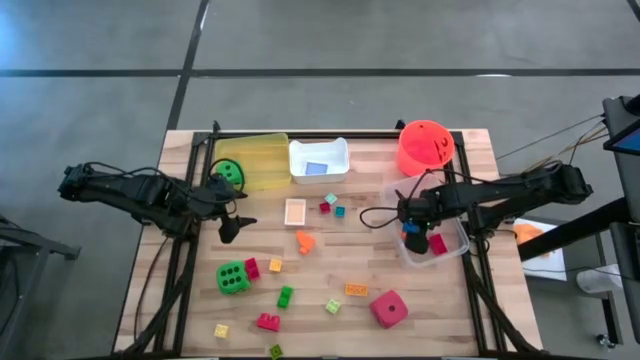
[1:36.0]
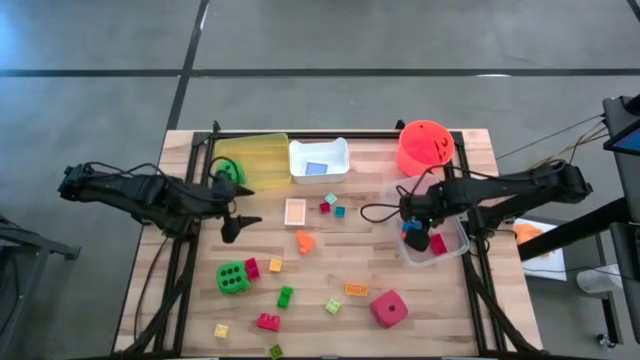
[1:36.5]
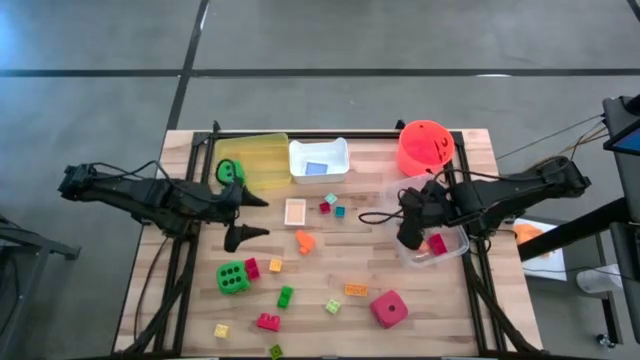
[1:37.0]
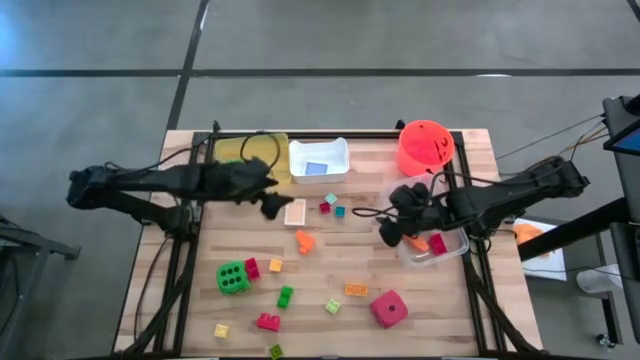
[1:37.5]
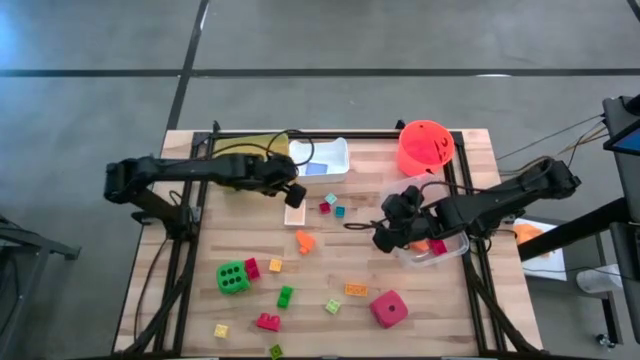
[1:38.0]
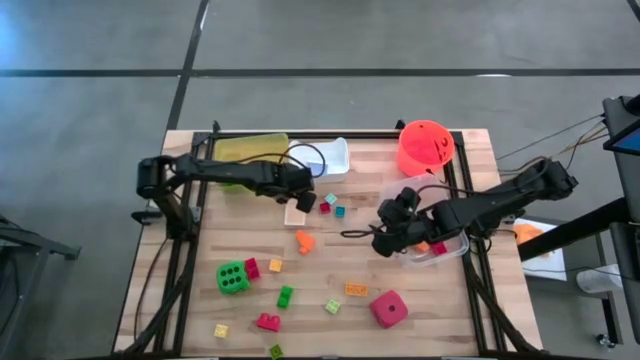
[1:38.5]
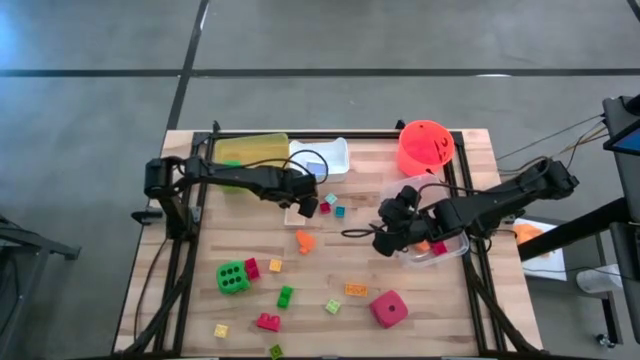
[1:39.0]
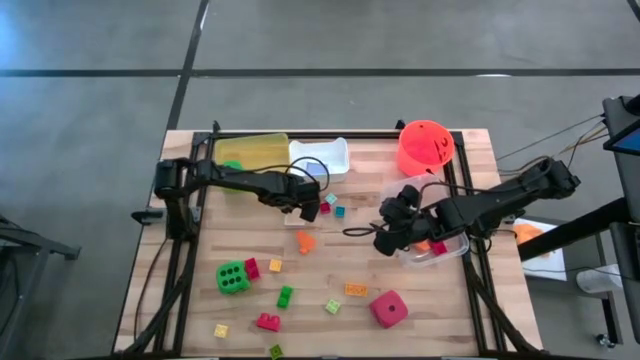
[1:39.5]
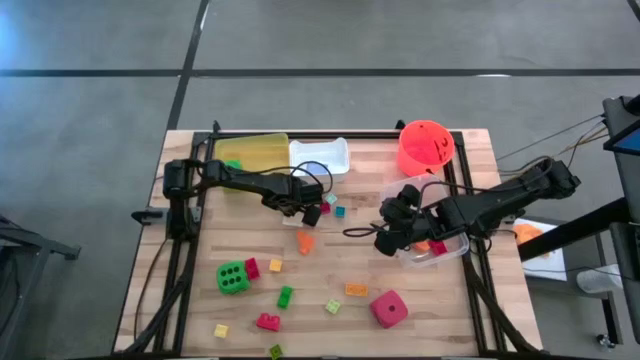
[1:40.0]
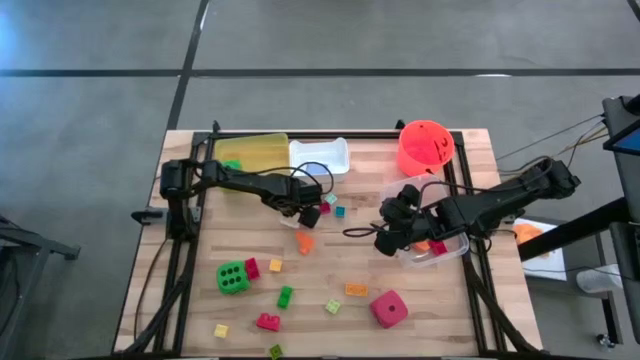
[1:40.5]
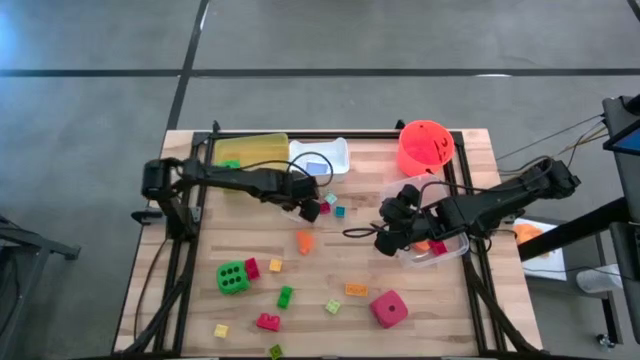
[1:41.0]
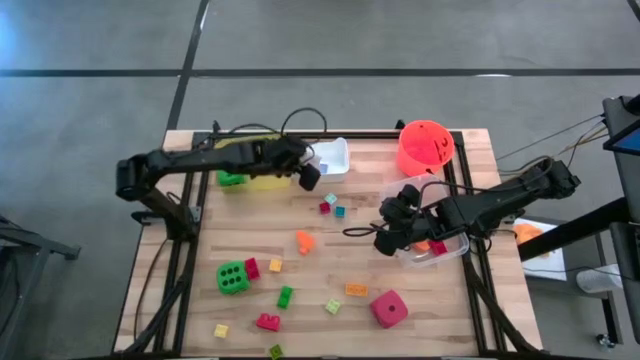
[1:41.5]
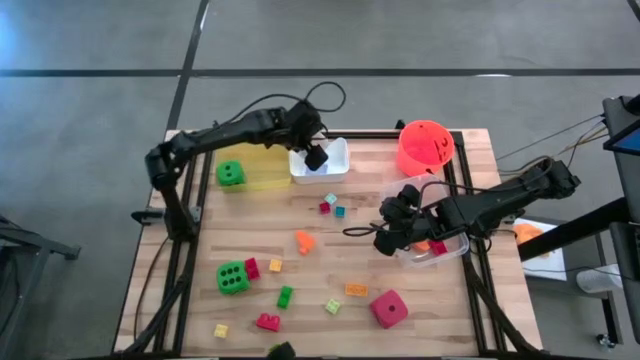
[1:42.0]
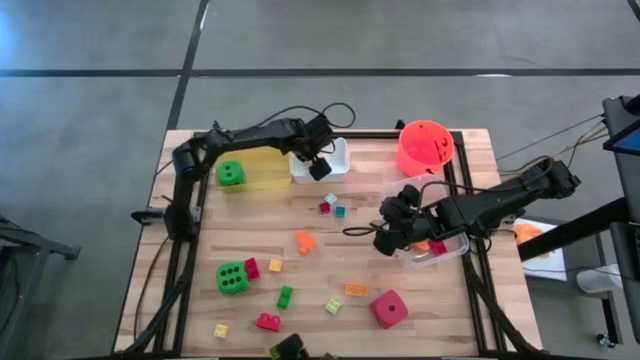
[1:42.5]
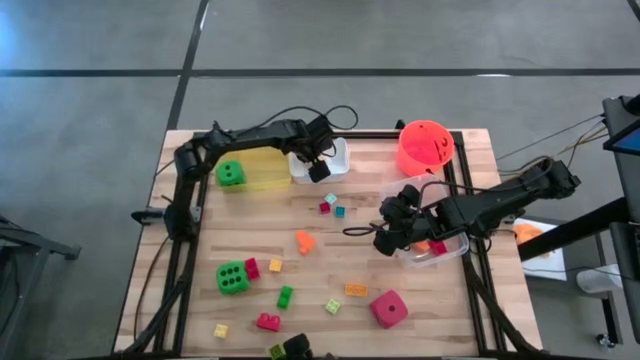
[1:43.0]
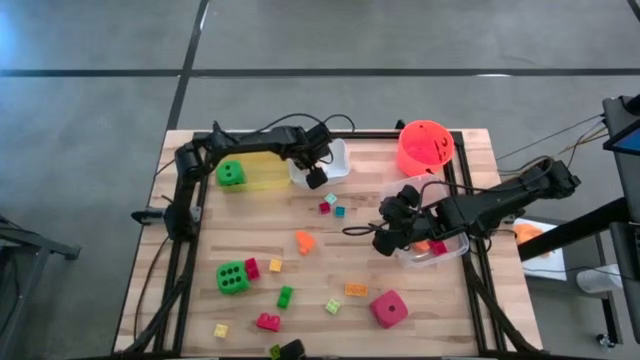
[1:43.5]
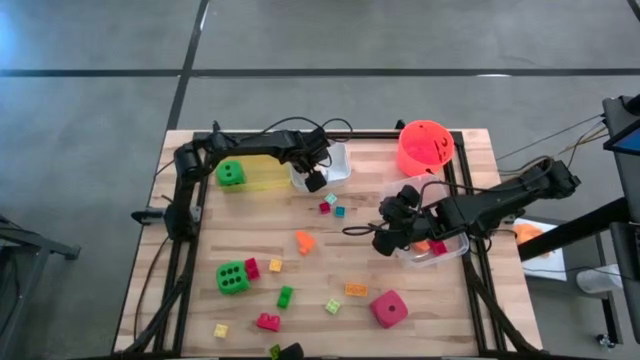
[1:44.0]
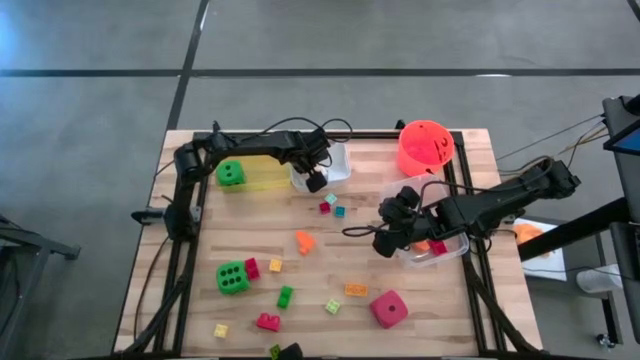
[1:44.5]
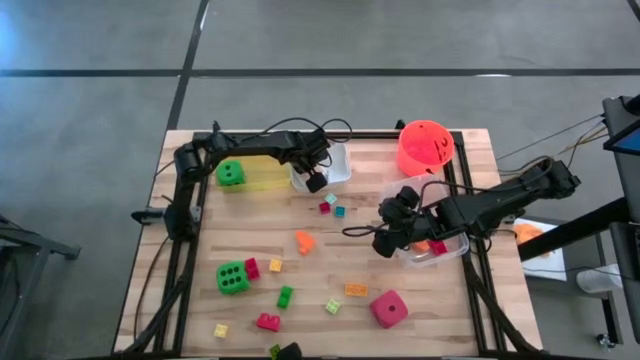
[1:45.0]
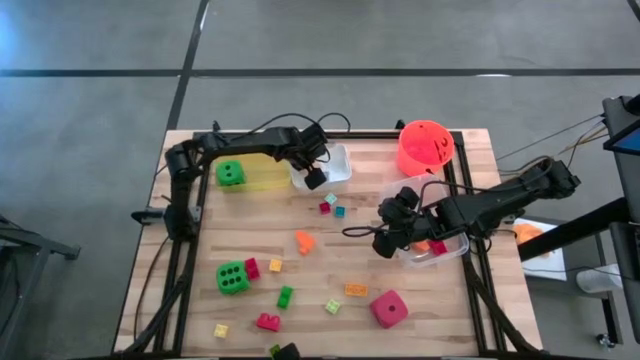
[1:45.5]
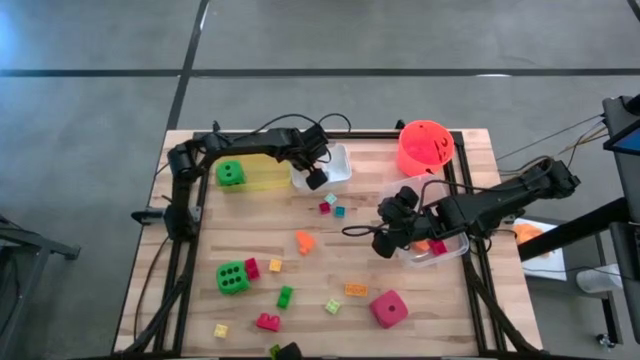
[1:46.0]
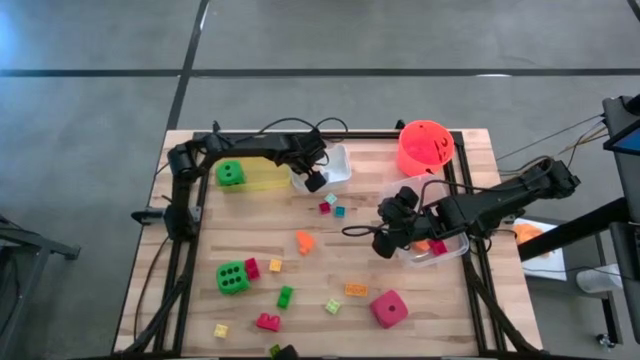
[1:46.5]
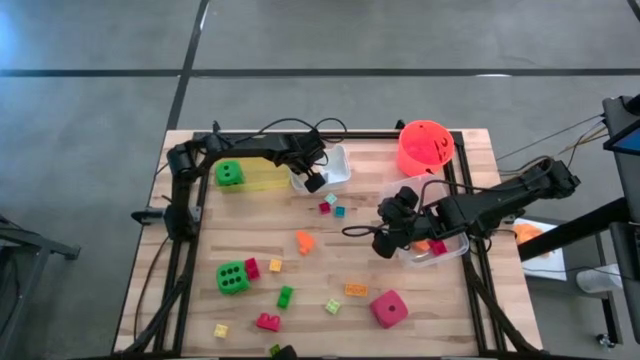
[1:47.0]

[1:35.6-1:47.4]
Task: Pick & Place Toys
Put the orange deck of cards into the white bin

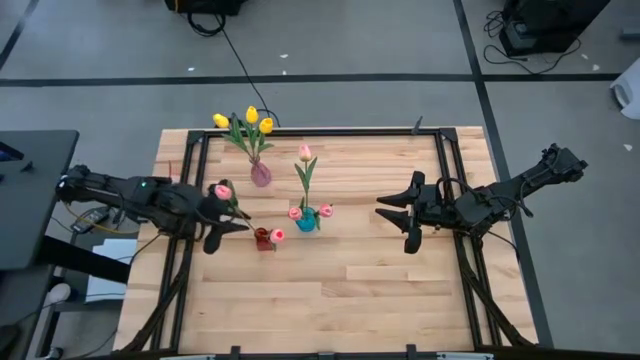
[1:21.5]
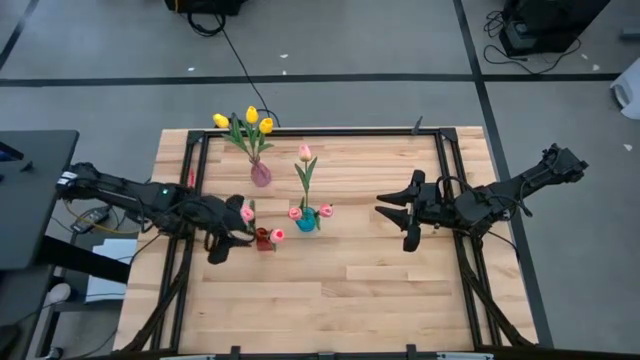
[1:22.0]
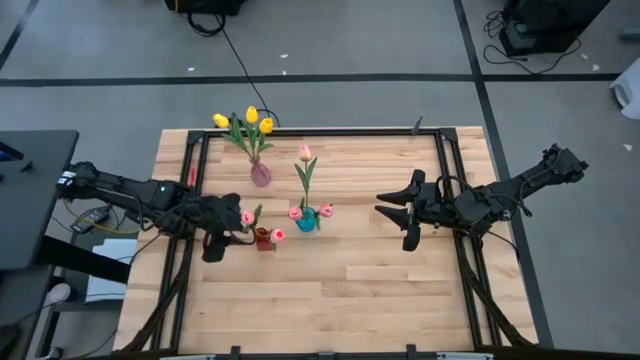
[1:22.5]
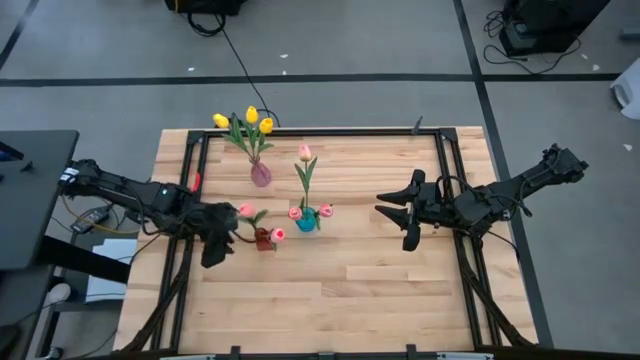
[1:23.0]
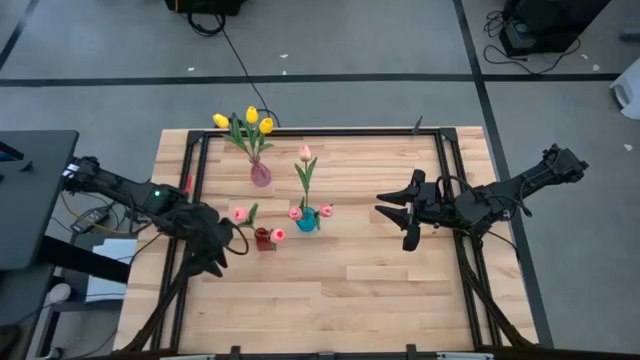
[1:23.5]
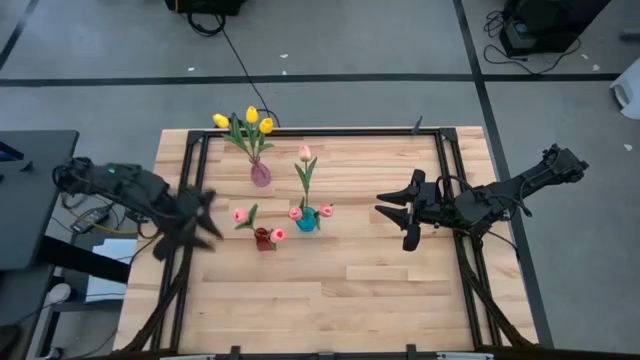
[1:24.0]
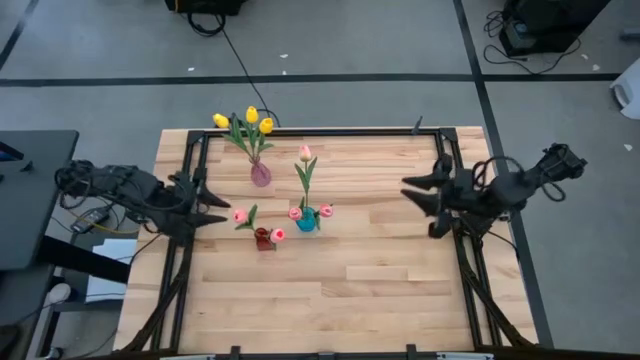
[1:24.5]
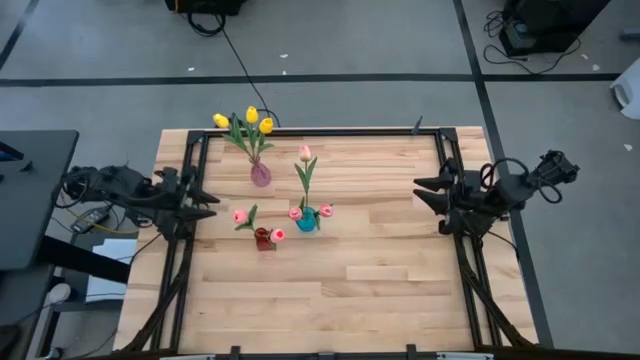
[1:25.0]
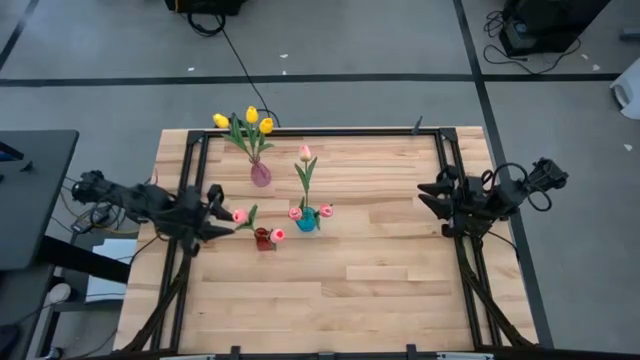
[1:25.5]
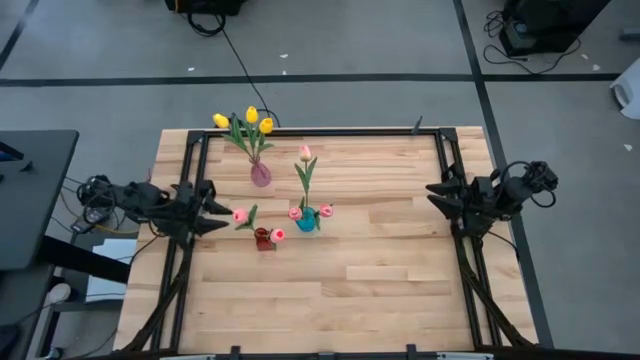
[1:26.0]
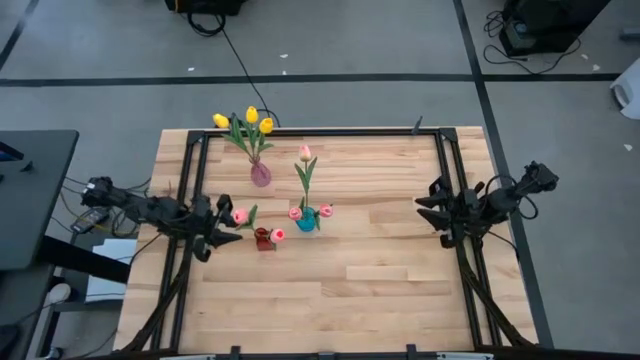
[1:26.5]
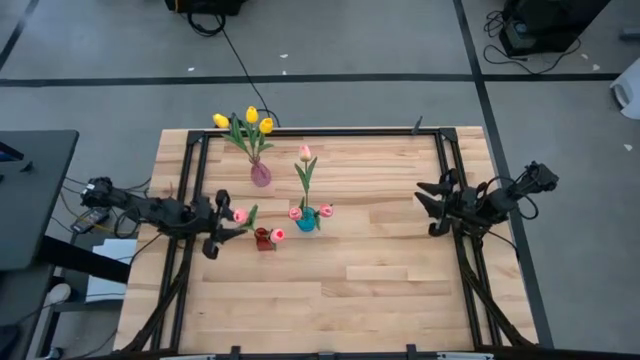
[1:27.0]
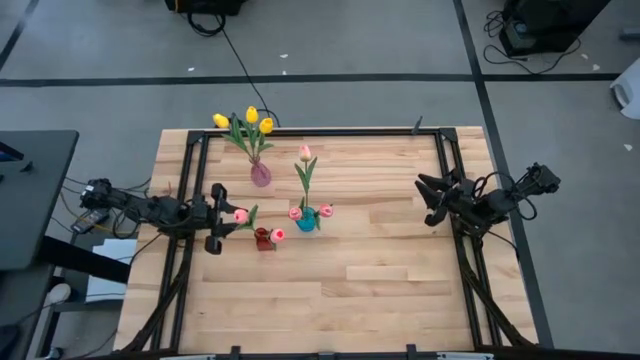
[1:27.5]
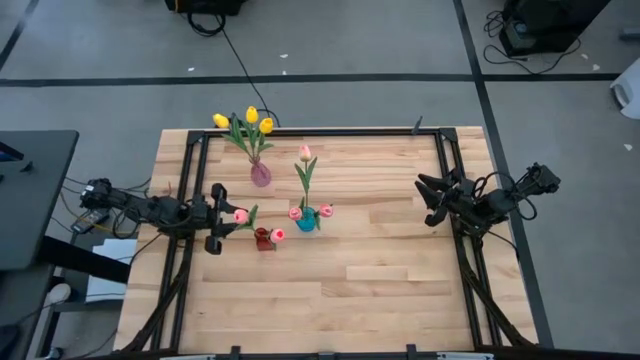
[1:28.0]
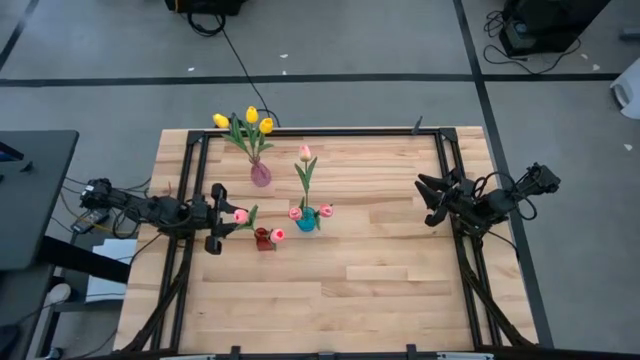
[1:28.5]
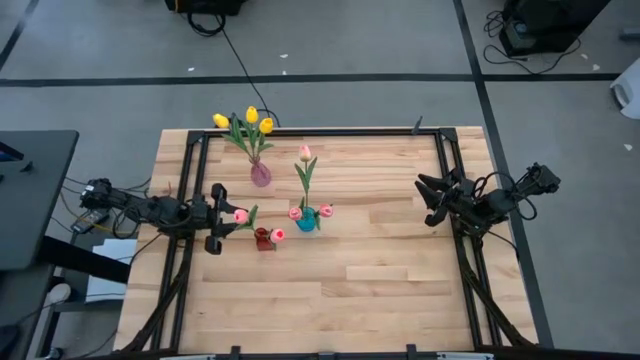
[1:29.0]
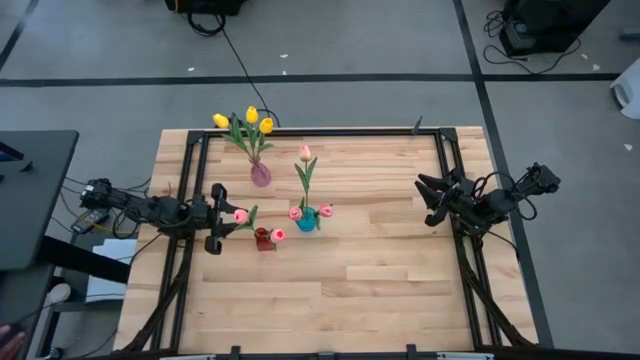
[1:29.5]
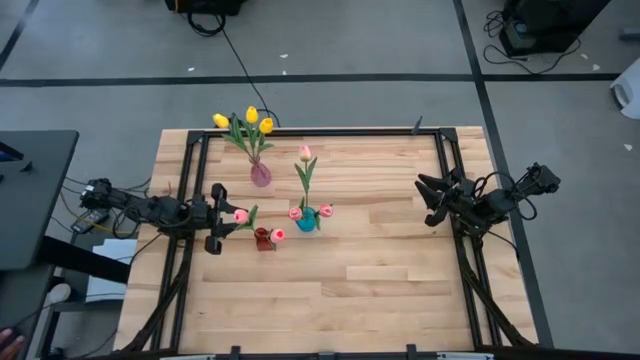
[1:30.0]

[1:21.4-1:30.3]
Task: Sort flowers into vase by color
Return to Home Position
